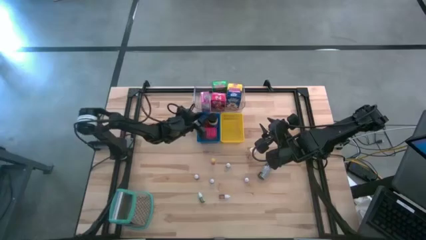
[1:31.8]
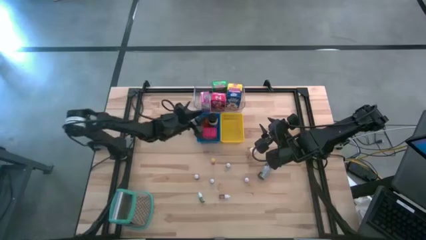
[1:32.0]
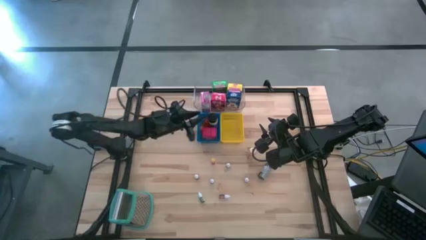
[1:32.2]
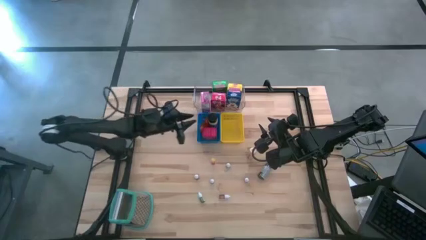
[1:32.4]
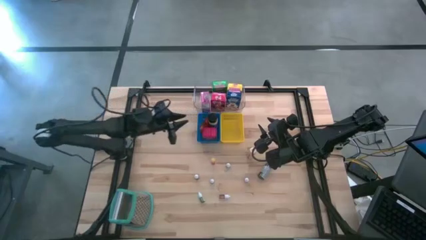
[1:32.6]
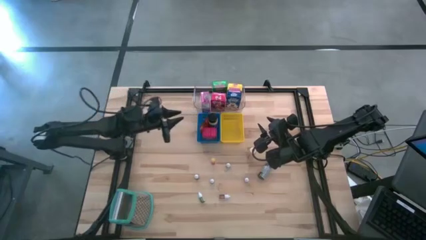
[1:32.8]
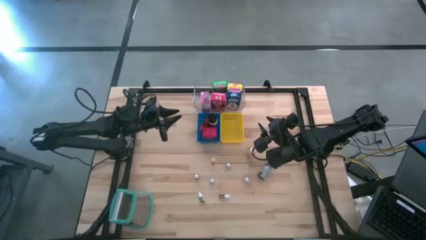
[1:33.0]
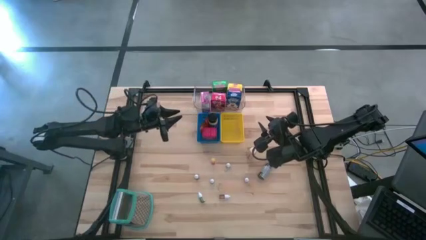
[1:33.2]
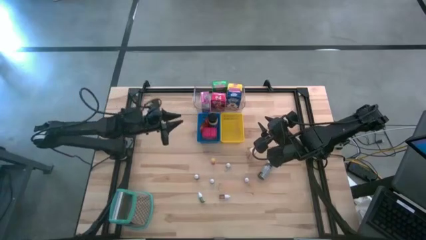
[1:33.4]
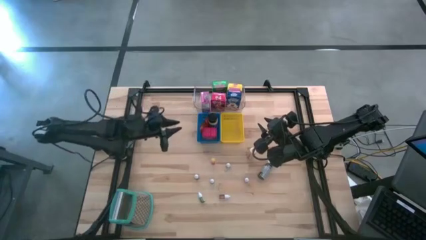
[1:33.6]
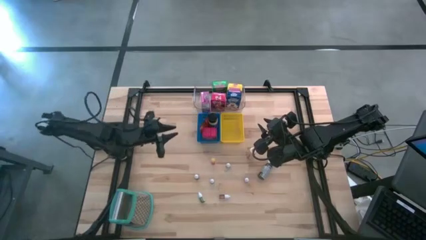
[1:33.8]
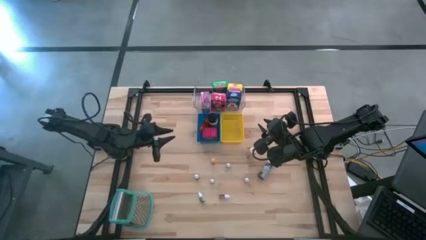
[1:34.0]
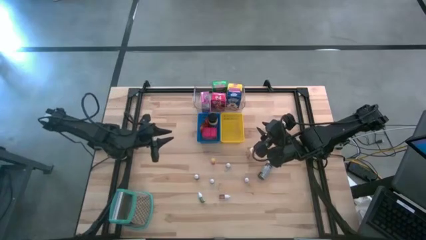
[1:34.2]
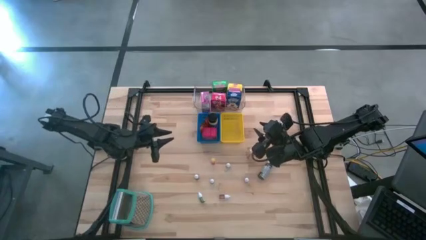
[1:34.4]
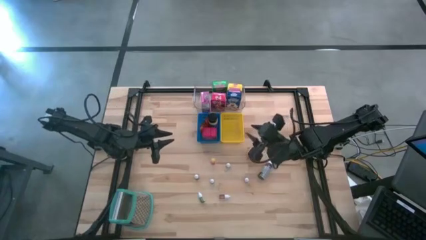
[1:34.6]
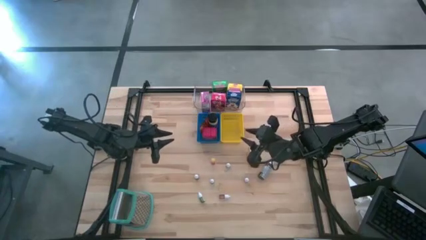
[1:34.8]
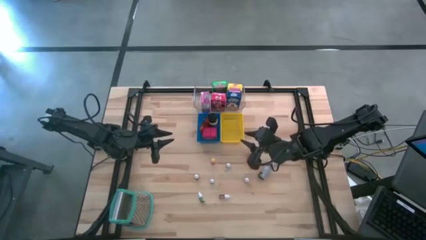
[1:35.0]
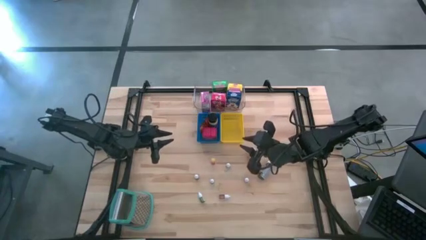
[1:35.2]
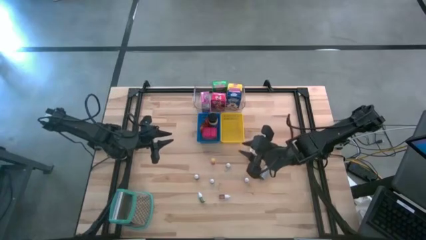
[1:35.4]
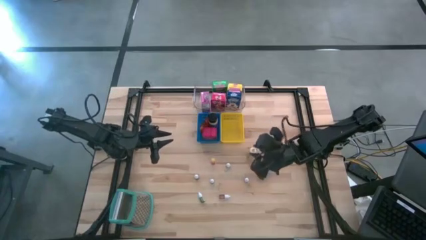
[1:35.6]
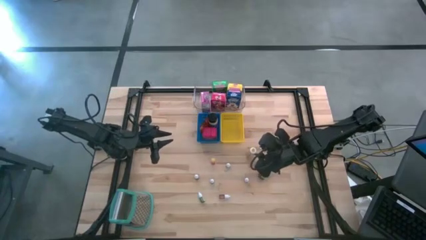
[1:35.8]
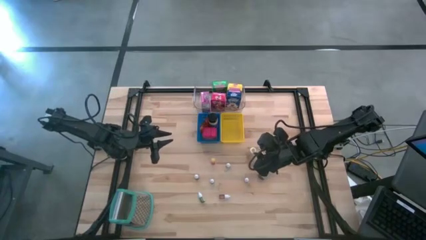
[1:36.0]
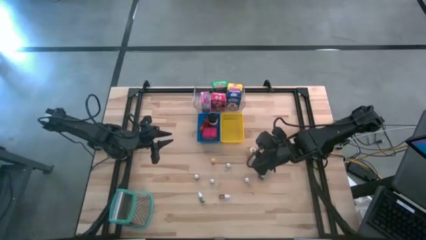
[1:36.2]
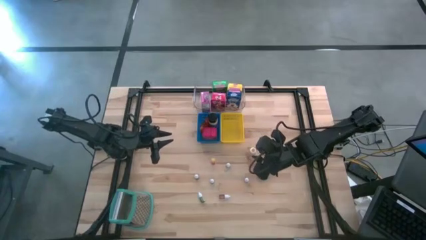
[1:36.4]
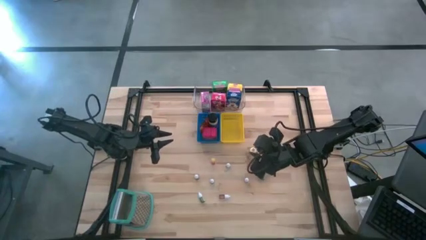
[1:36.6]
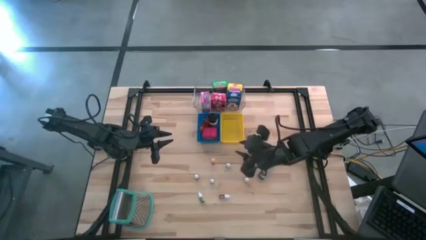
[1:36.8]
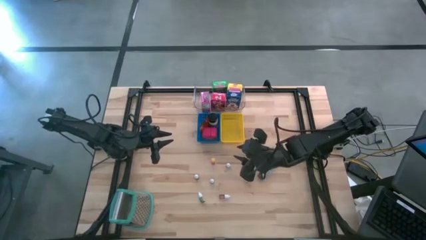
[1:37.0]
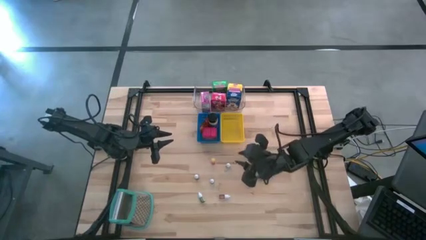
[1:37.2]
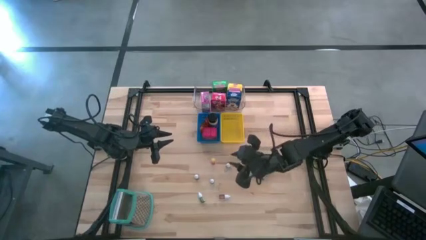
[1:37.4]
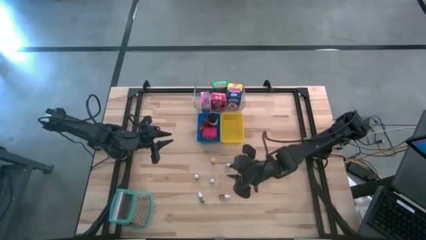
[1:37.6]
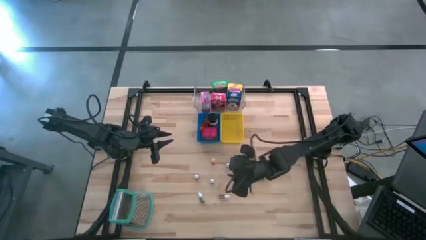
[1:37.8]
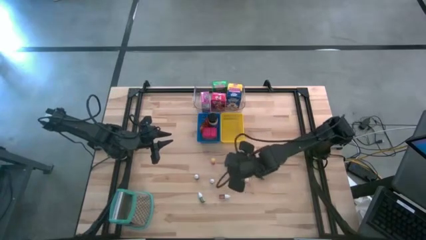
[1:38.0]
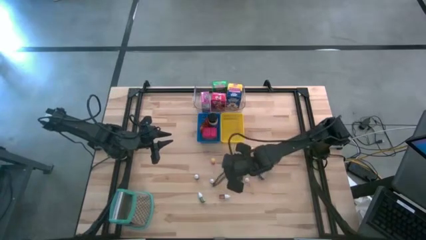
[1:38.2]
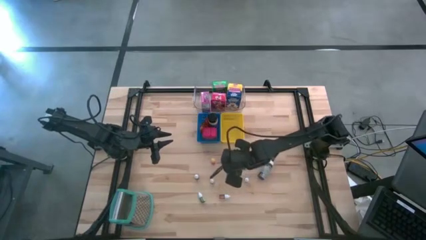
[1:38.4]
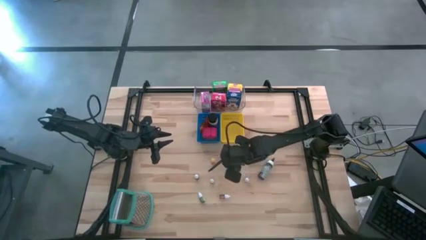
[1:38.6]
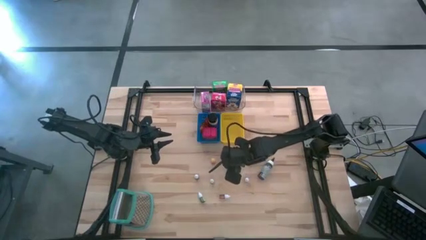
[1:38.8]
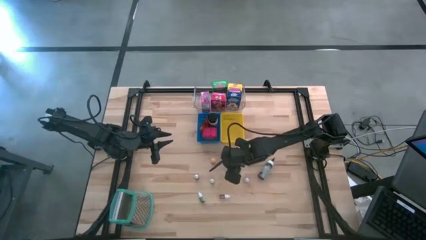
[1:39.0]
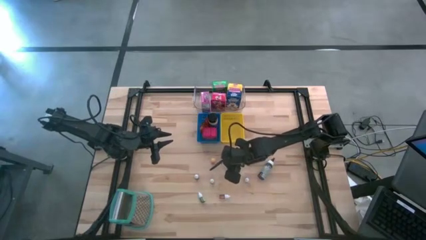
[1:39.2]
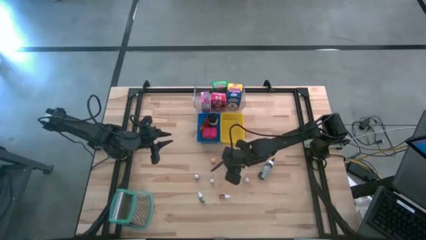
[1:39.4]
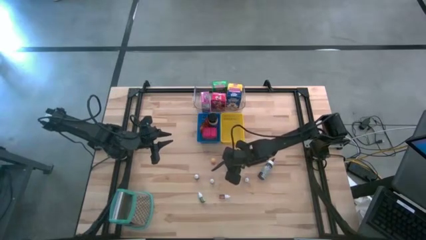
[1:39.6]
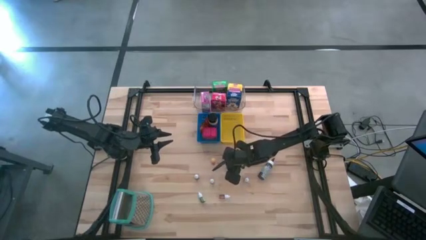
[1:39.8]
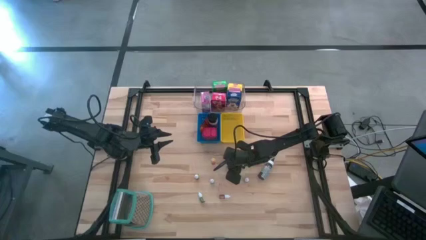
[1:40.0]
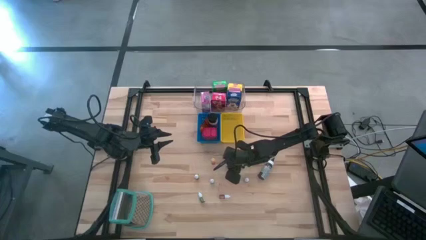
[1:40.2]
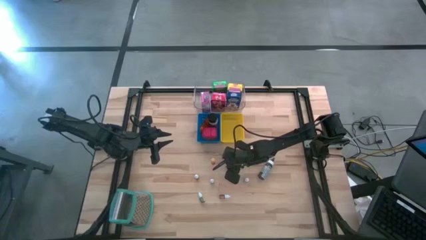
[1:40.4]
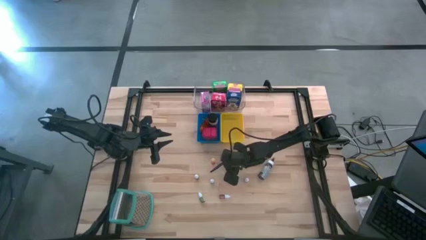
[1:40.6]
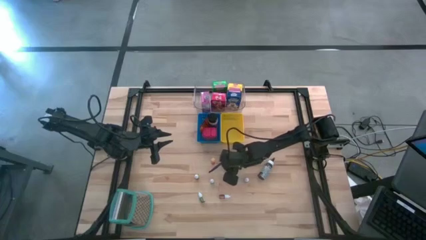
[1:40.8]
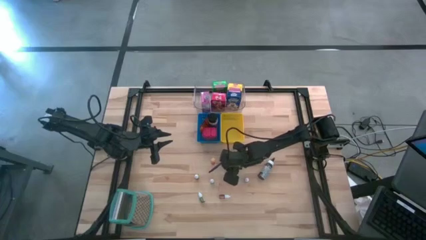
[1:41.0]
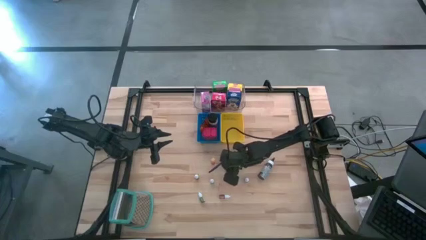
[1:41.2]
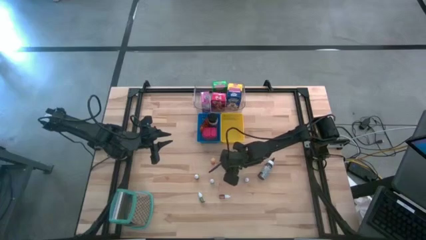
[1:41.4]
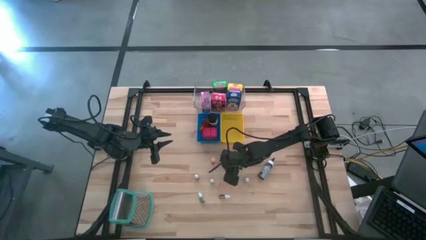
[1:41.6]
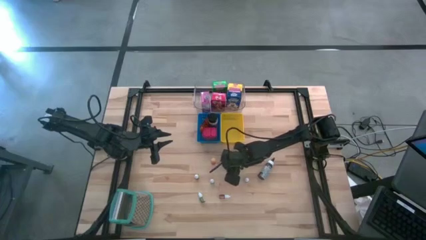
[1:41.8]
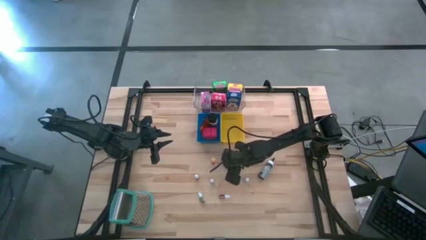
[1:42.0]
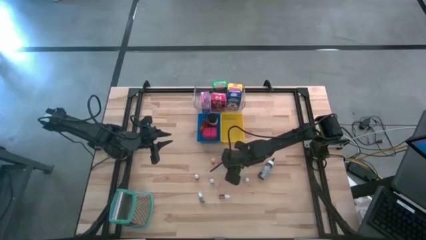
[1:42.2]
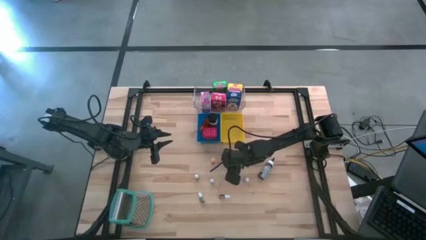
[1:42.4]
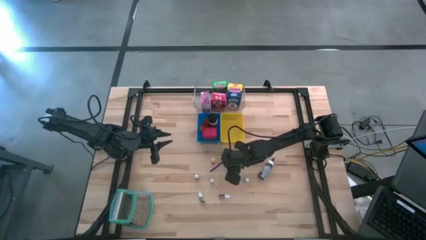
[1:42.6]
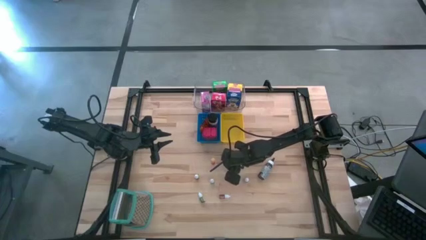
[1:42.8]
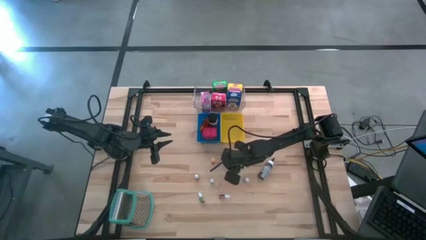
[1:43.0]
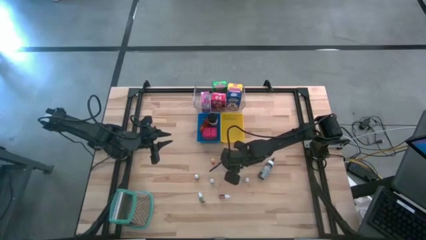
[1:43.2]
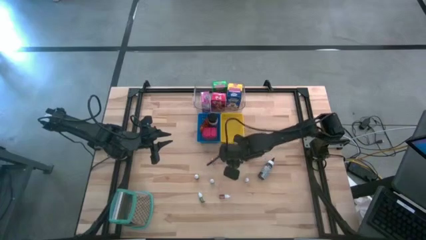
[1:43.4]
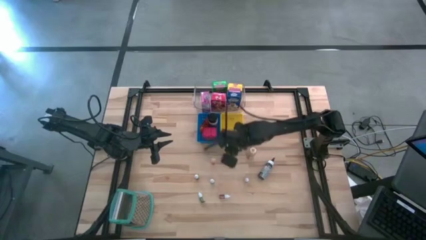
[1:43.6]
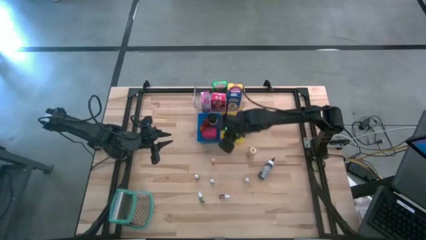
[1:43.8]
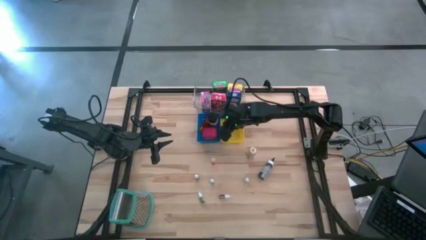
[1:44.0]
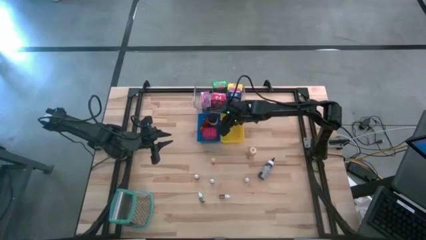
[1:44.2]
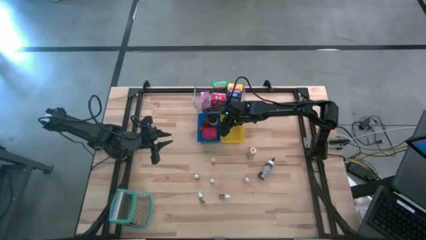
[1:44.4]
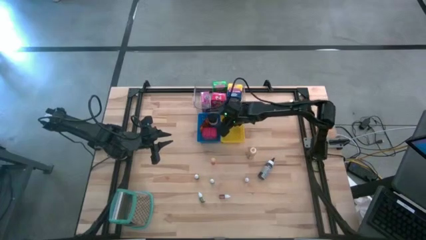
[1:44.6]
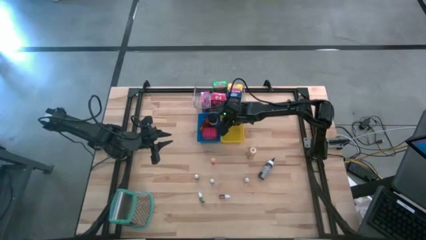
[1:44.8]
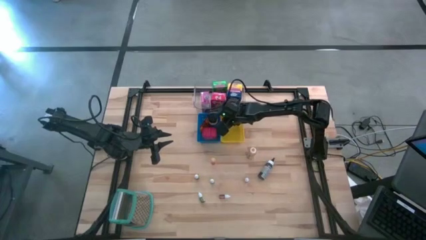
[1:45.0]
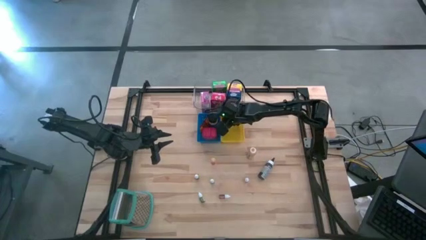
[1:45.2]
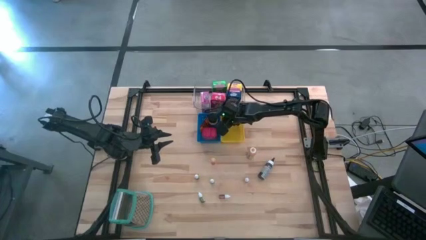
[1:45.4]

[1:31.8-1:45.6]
Task: Pick & Place Kitchen Items
Put the small black food coloring bottle into the yellow bin

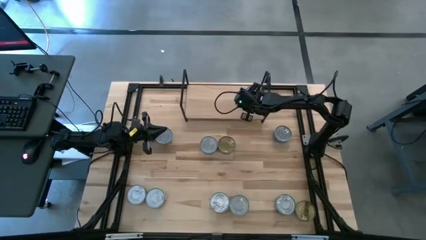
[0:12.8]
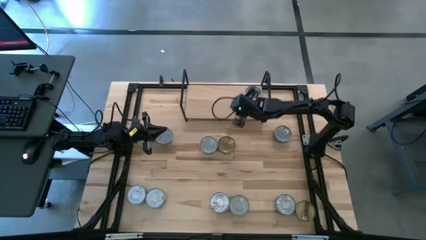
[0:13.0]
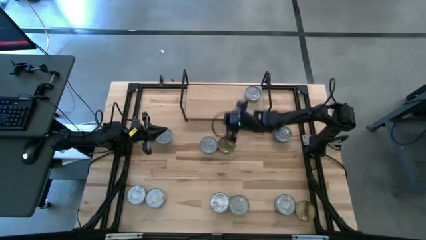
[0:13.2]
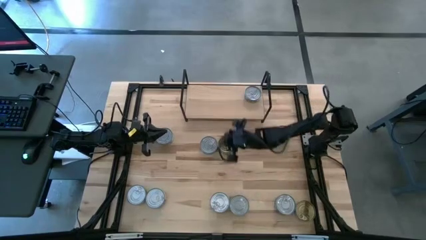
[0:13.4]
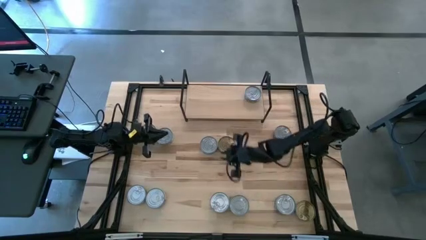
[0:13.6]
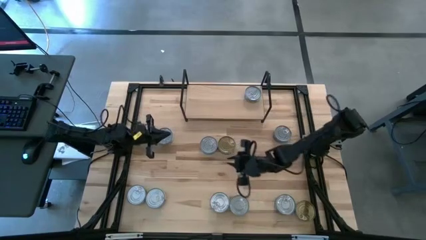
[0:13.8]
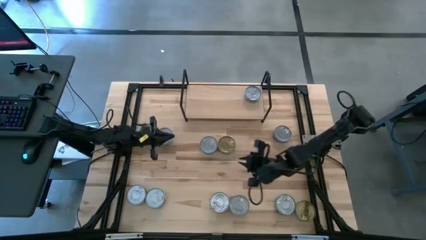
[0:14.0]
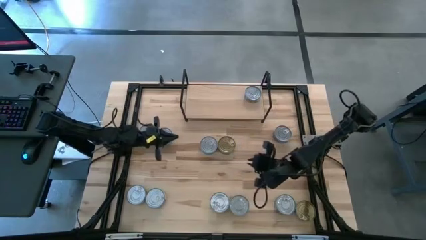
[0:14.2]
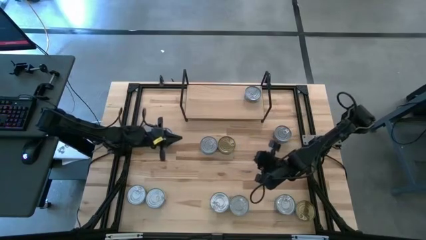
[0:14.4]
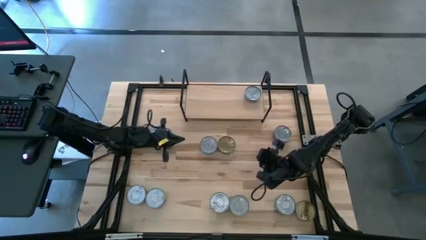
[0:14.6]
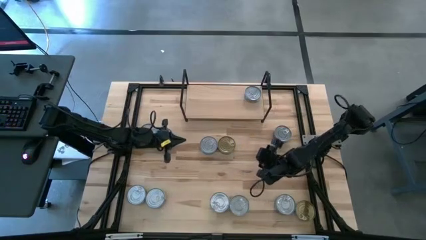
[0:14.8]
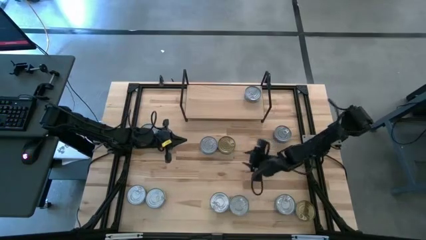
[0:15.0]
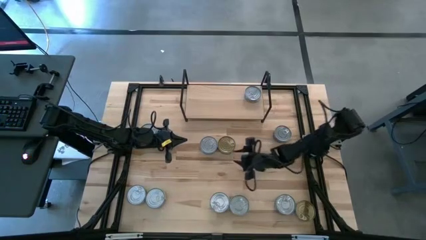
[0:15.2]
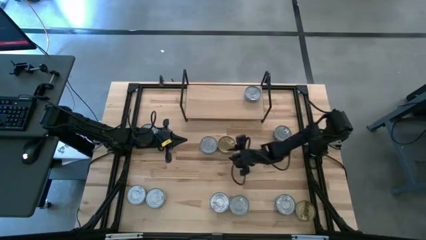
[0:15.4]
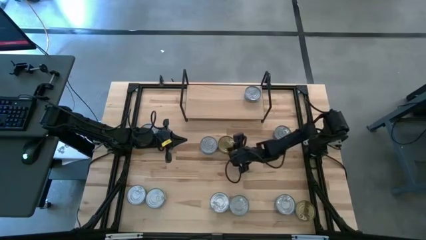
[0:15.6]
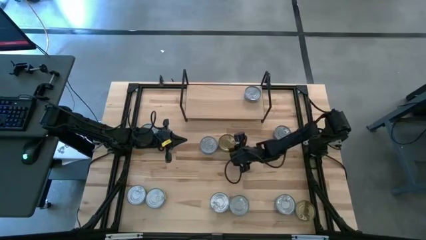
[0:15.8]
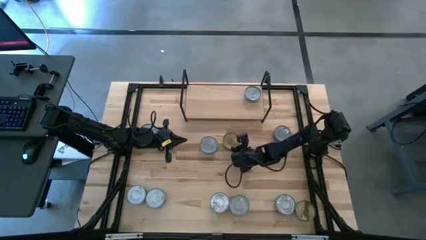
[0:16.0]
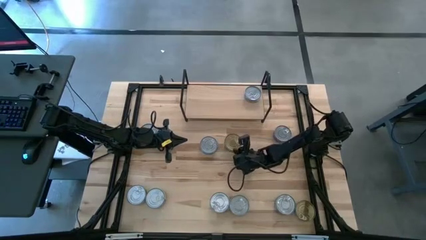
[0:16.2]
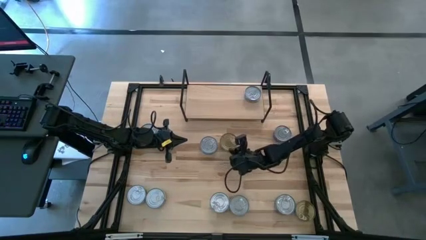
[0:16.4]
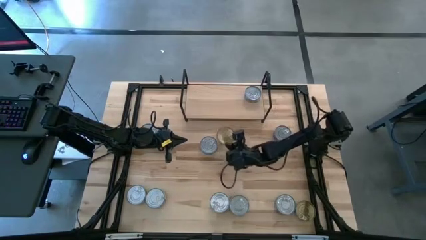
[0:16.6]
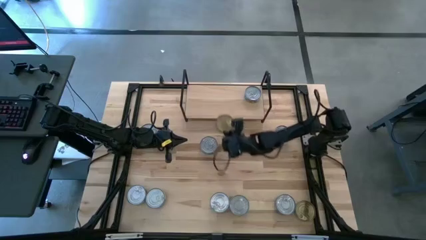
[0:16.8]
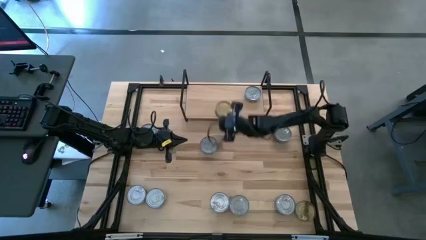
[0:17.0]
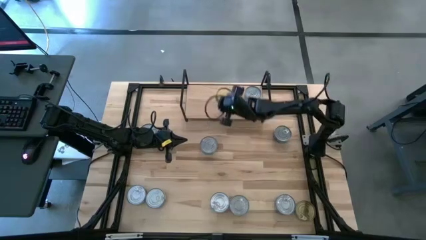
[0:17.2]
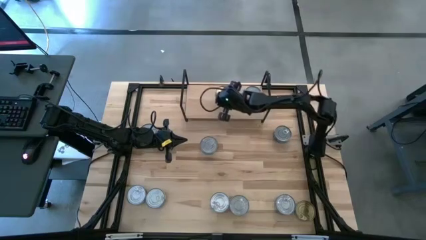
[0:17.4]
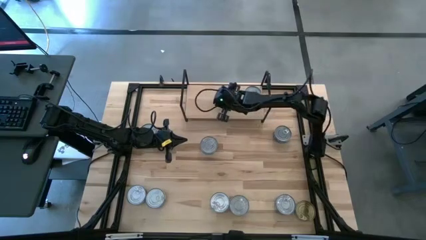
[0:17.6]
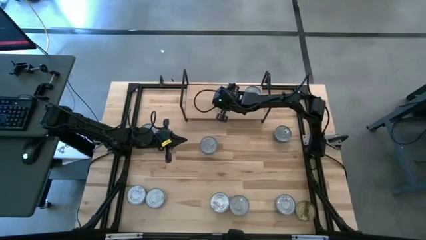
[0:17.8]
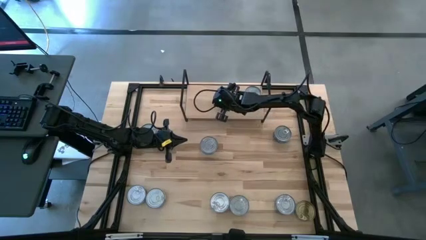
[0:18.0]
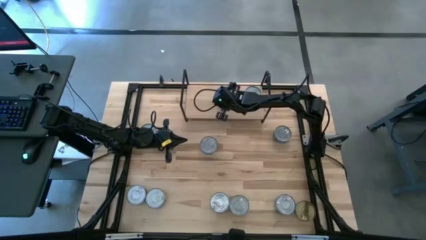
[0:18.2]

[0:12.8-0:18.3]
Task: Stack canned seafood by type on shelf
Put the top right green tuna can on the shelf
